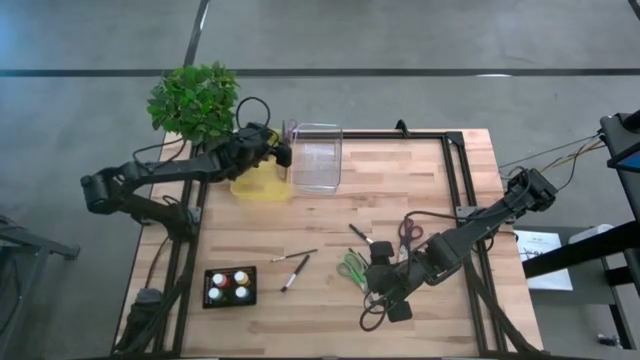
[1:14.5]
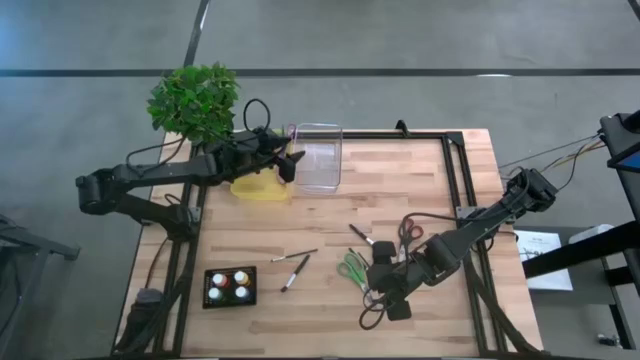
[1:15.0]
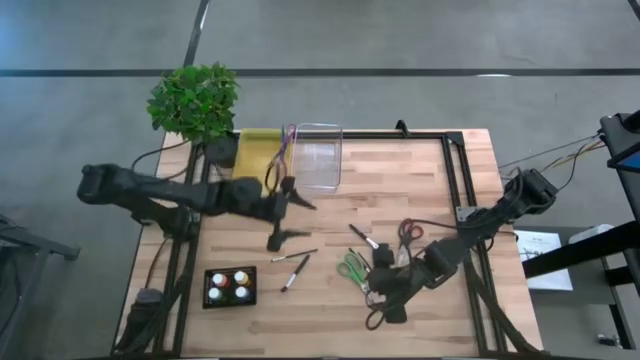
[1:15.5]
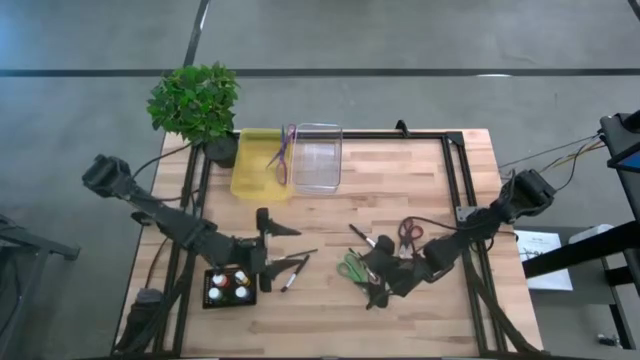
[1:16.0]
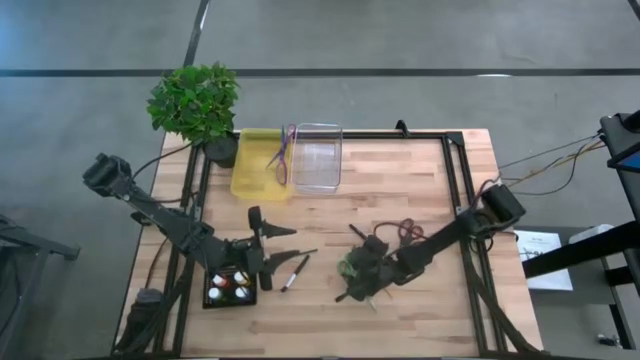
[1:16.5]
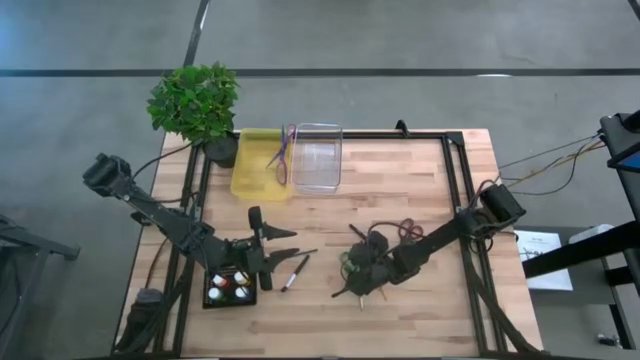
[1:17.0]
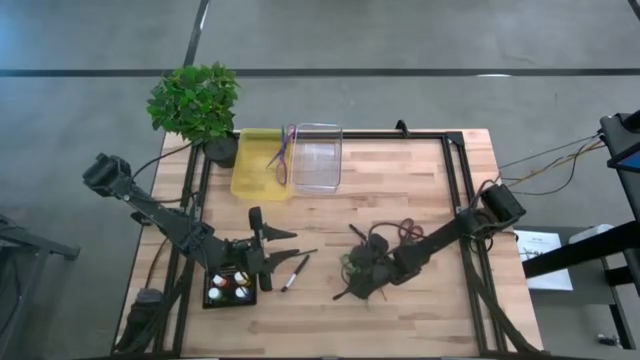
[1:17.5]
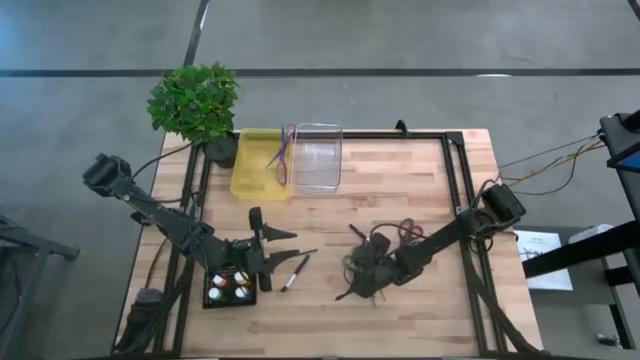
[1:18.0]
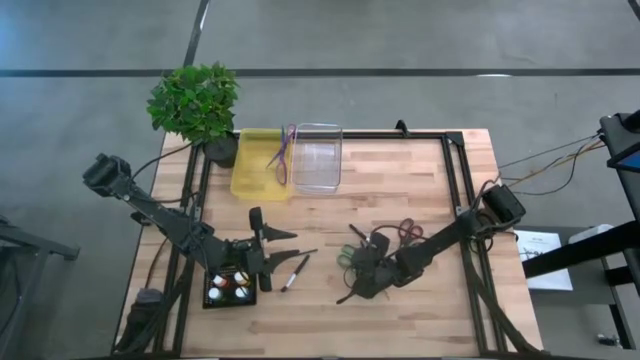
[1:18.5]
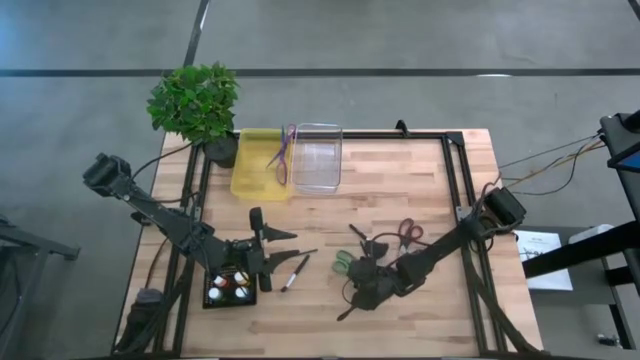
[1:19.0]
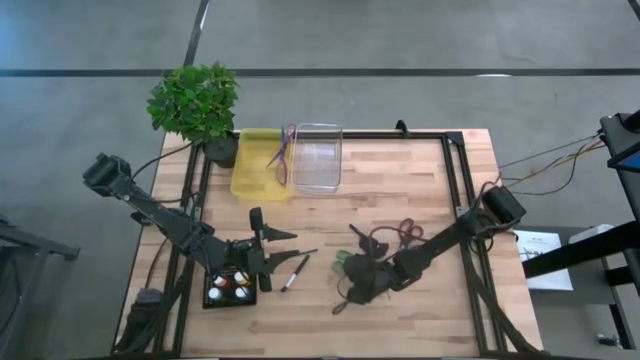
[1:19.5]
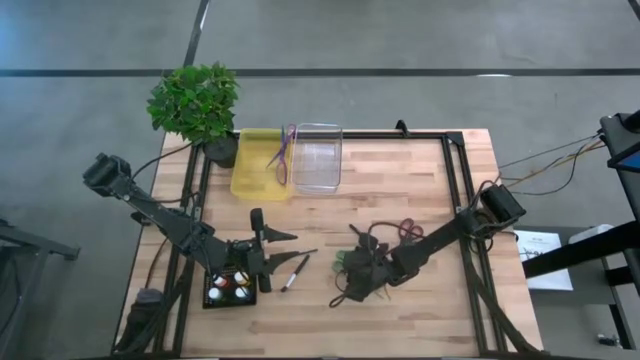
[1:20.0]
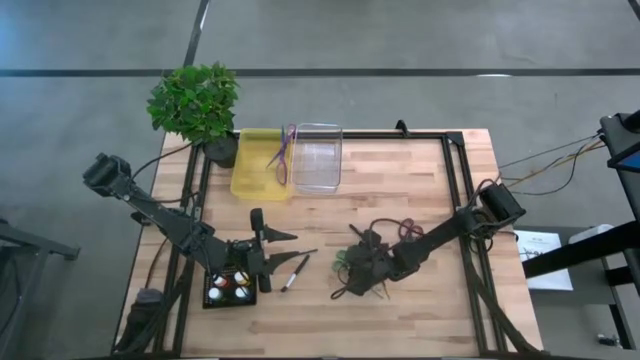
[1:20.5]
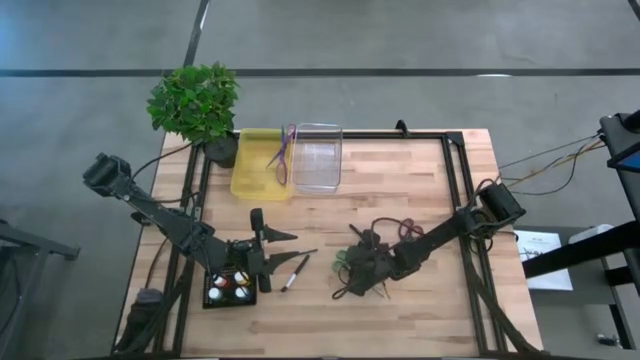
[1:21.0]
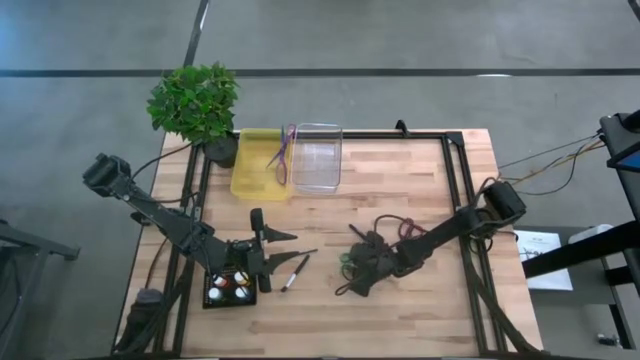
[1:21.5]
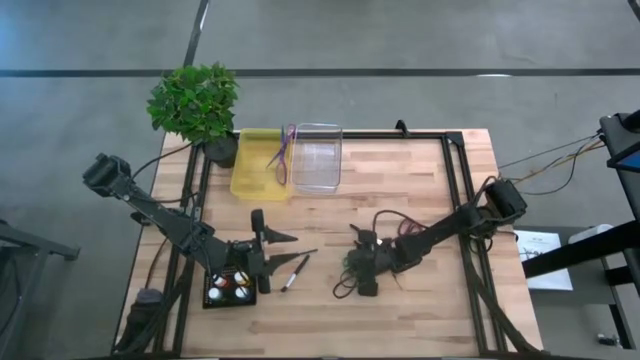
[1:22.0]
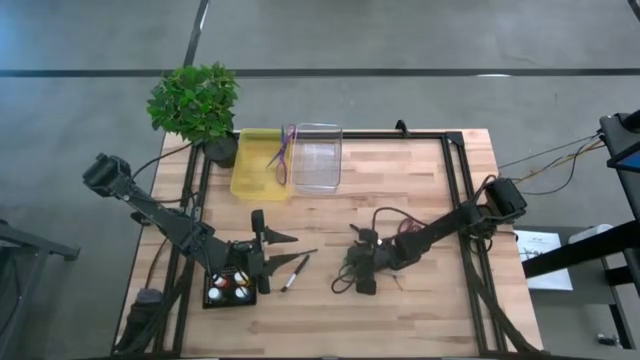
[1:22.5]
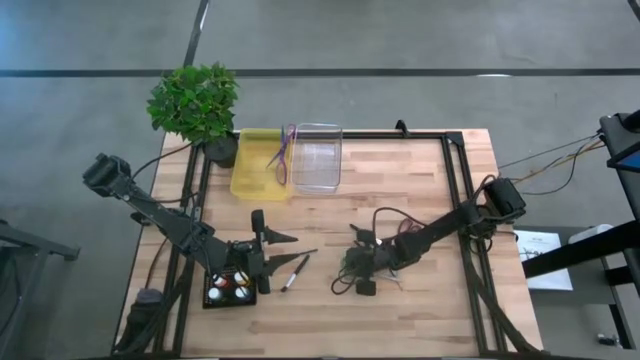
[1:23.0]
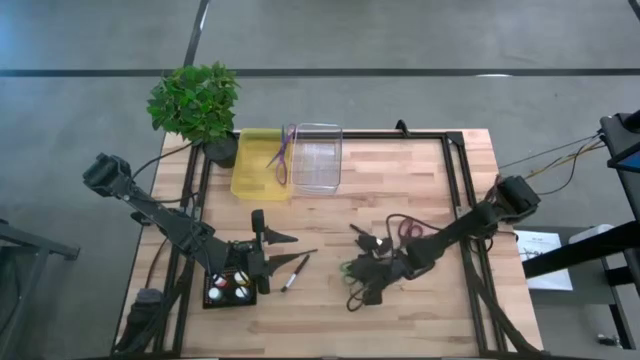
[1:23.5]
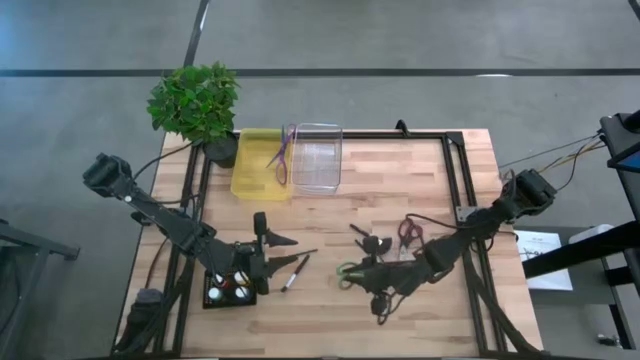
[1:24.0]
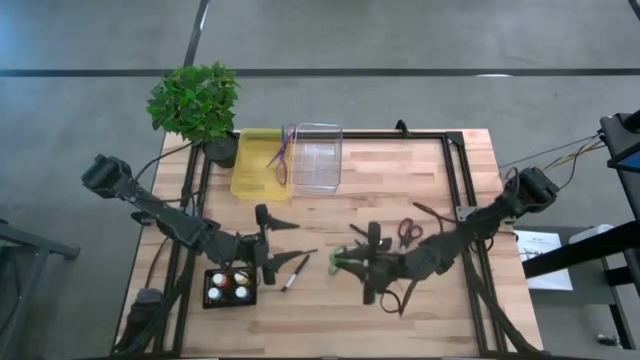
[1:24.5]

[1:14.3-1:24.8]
Task: Pick & Place Paint Supplies
Put the green scissors into the transparent yellow bin

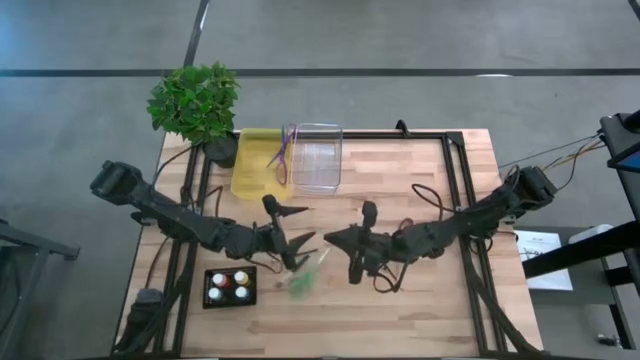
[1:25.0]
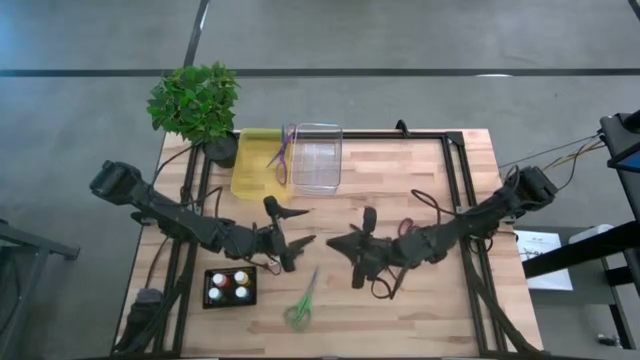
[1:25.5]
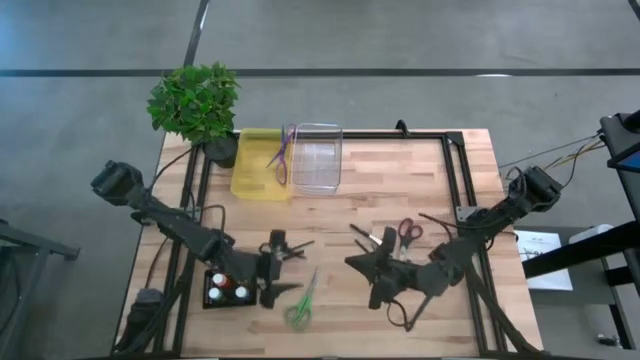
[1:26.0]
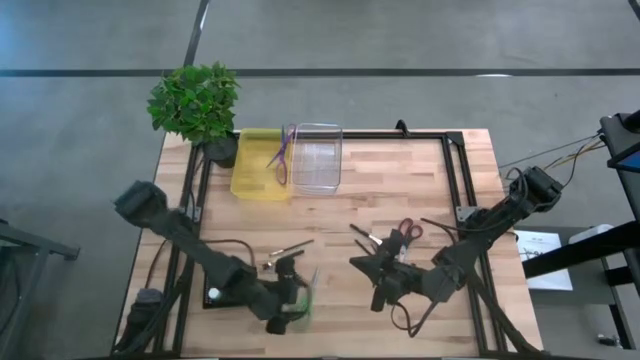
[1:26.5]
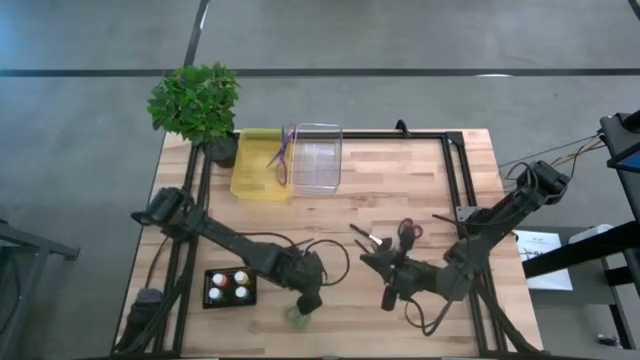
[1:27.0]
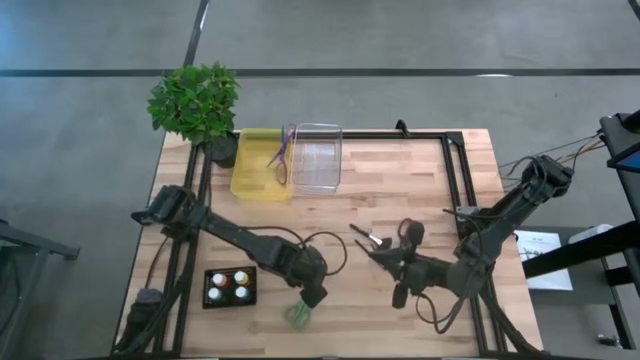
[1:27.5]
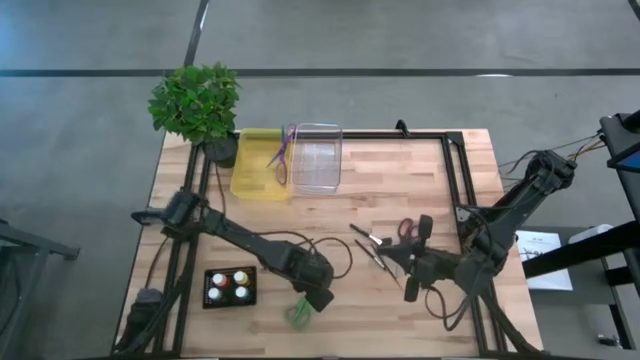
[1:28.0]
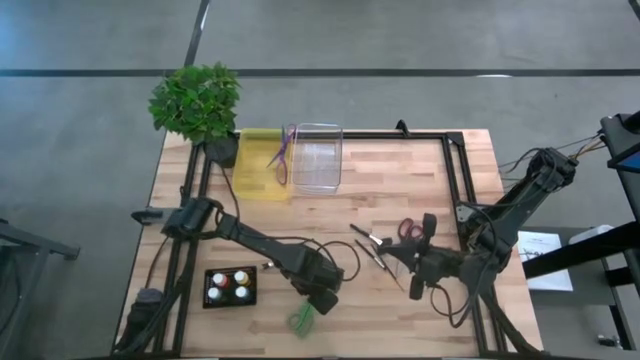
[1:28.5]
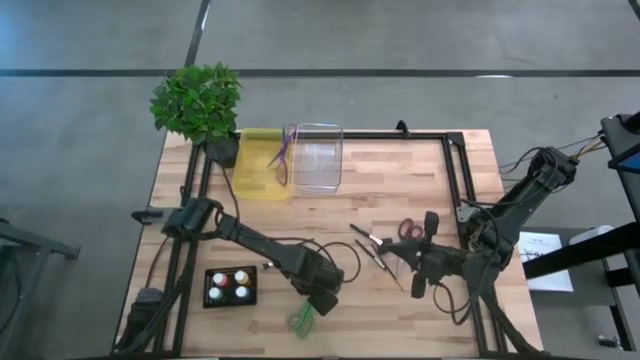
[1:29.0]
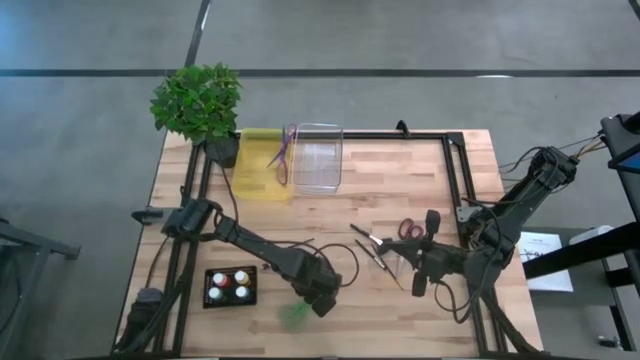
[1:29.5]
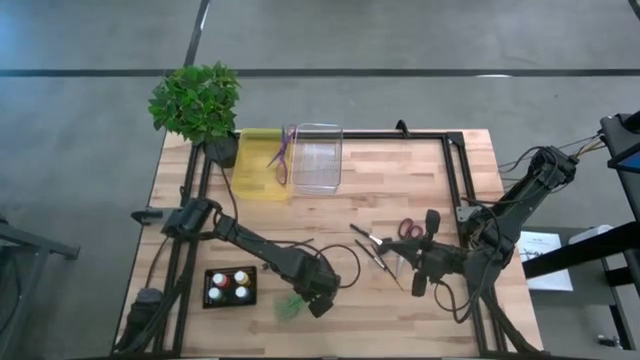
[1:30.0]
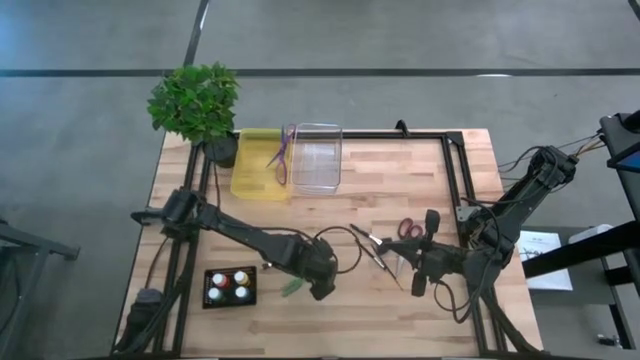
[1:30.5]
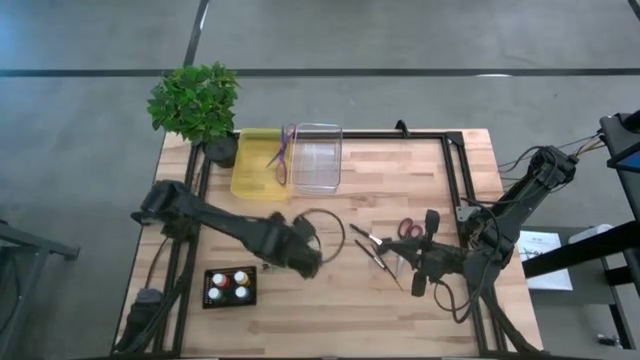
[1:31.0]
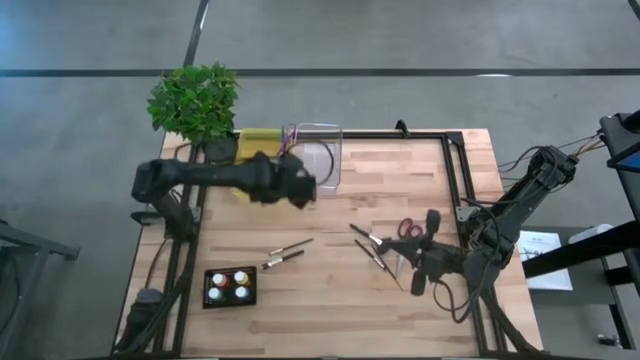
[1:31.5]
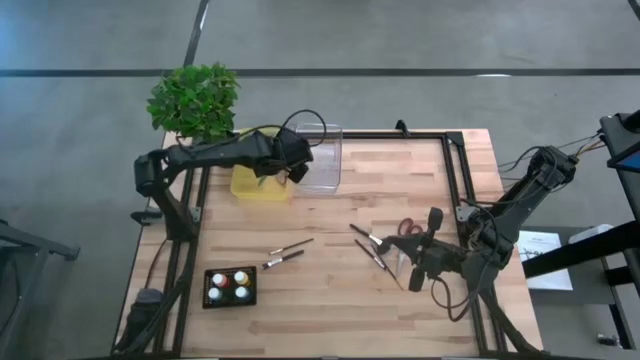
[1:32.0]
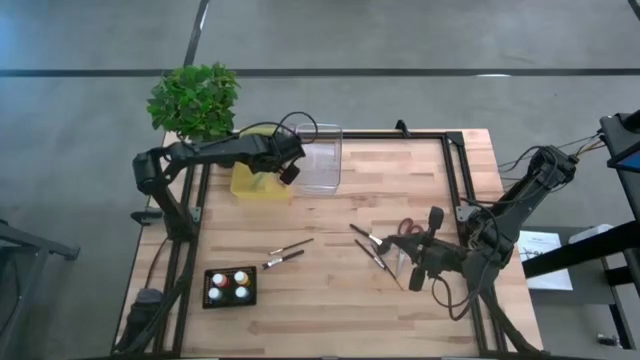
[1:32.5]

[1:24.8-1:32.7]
Put the green scissors into the transparent yellow bin

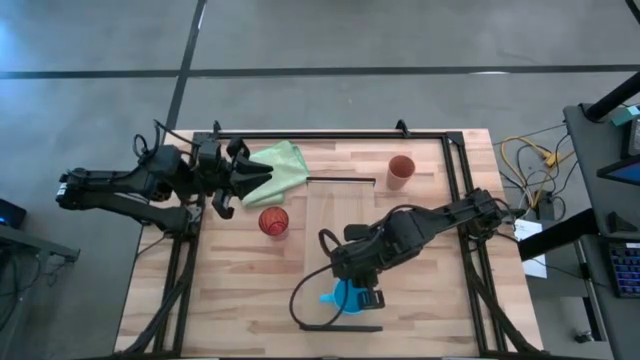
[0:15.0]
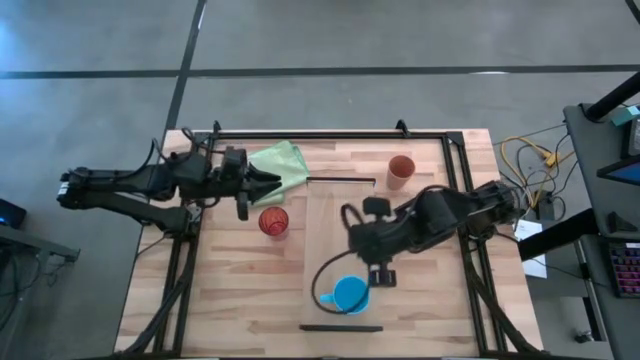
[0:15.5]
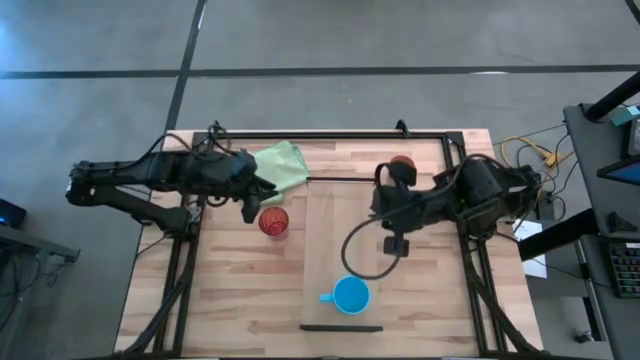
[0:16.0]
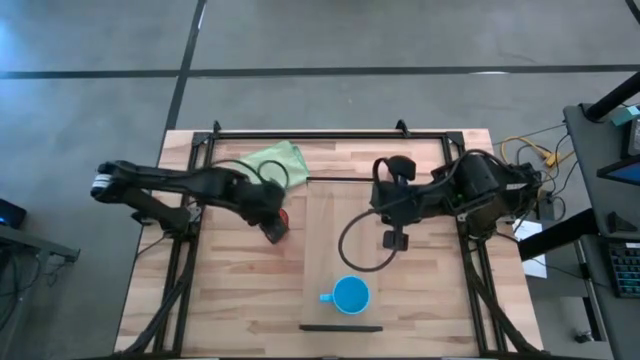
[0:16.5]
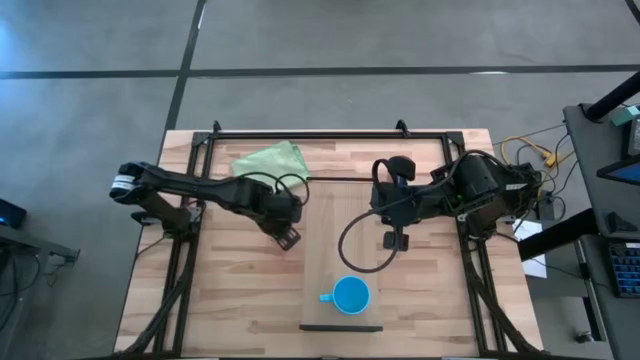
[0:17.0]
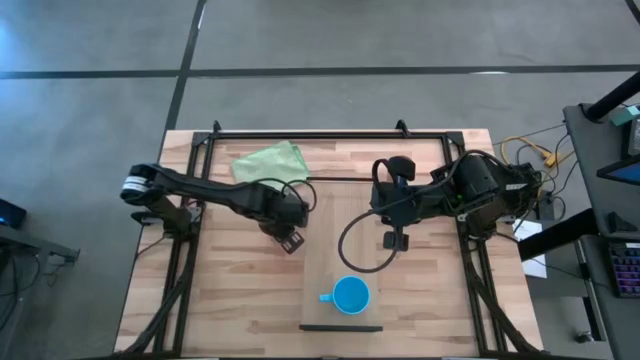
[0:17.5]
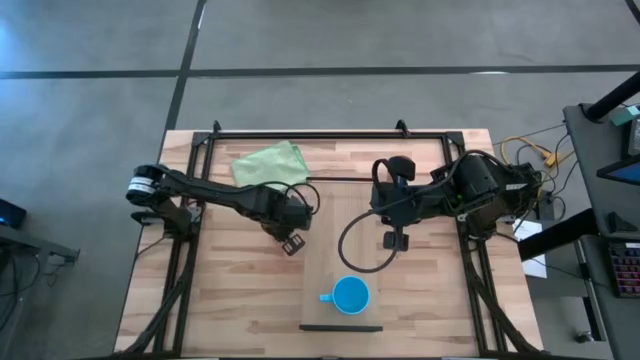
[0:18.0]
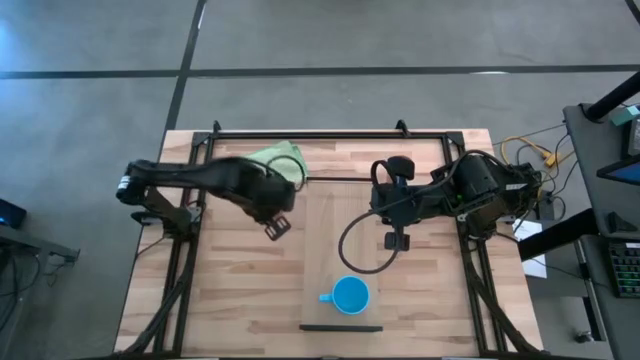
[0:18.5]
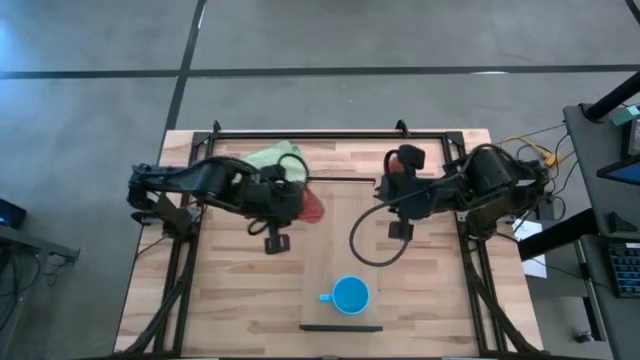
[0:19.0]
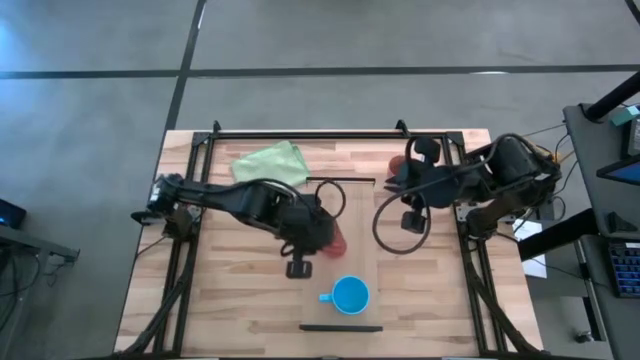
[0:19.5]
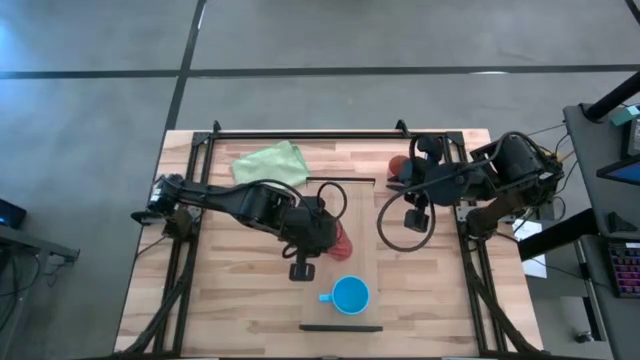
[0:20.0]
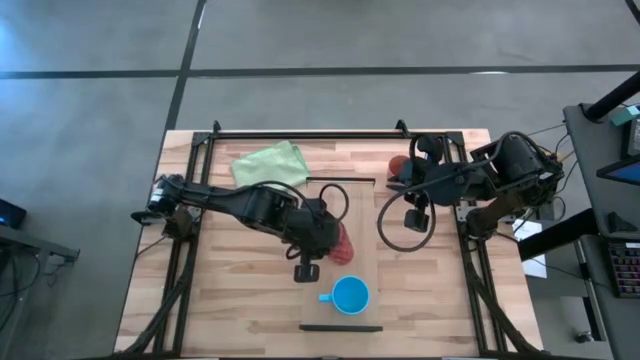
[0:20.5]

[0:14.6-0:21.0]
Task: Stack small to large cups/mugs on shelf
Put the orange cup on the shelf
